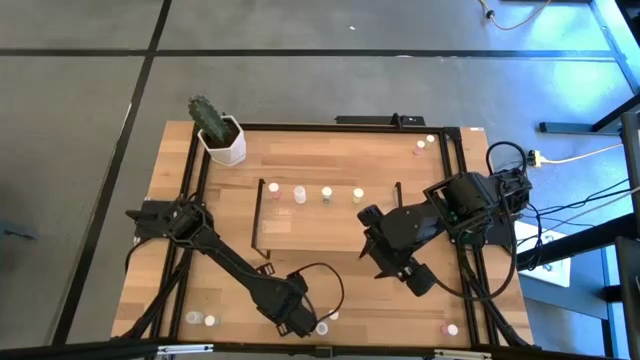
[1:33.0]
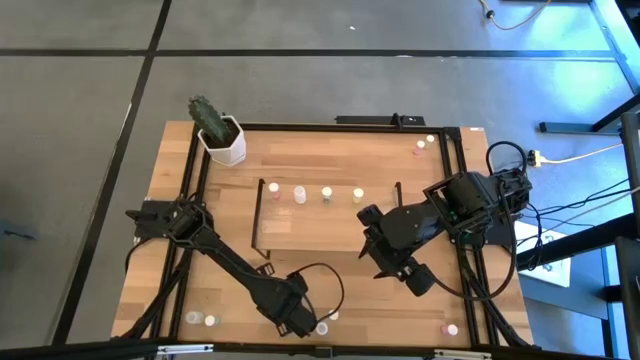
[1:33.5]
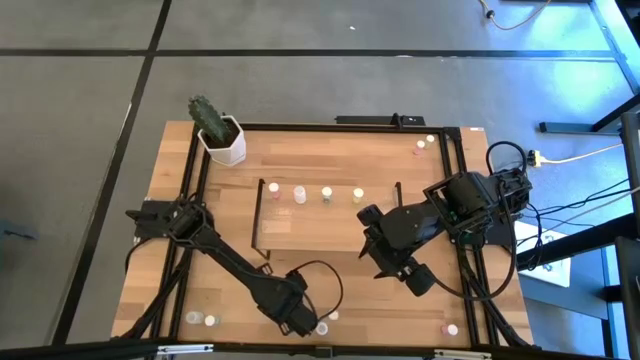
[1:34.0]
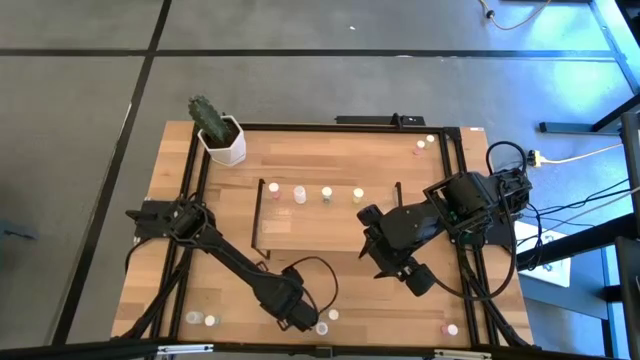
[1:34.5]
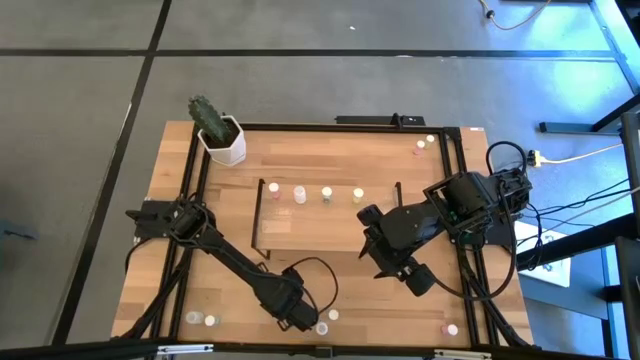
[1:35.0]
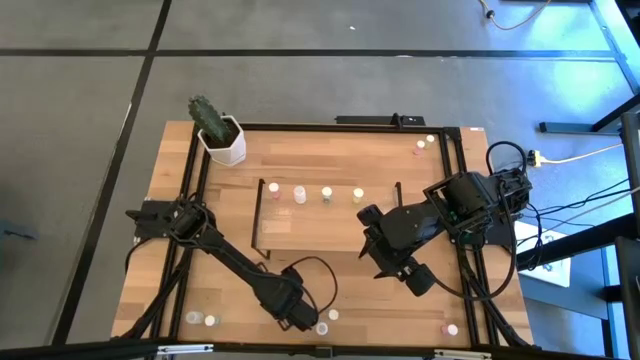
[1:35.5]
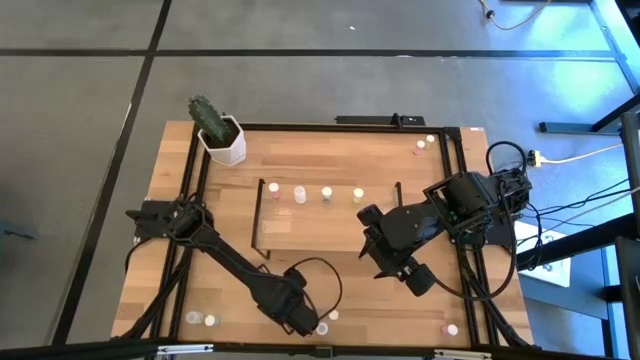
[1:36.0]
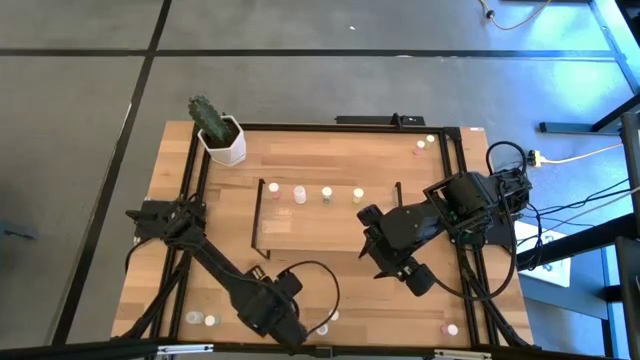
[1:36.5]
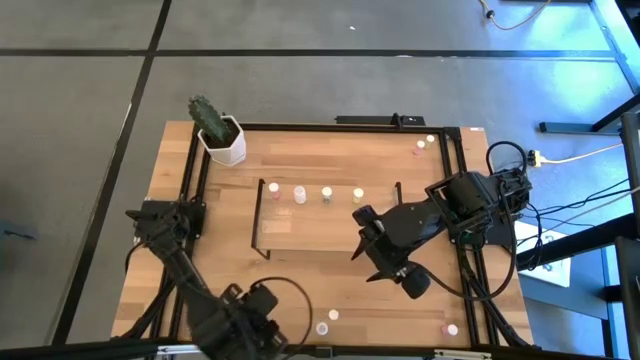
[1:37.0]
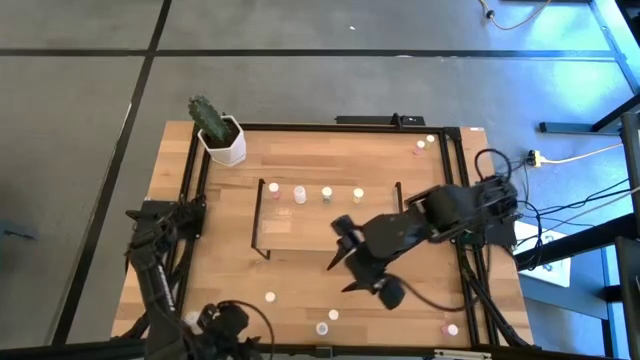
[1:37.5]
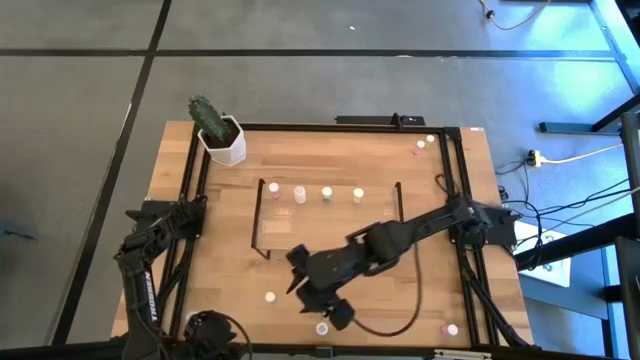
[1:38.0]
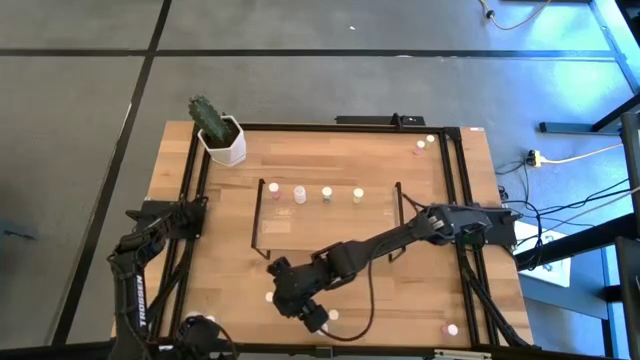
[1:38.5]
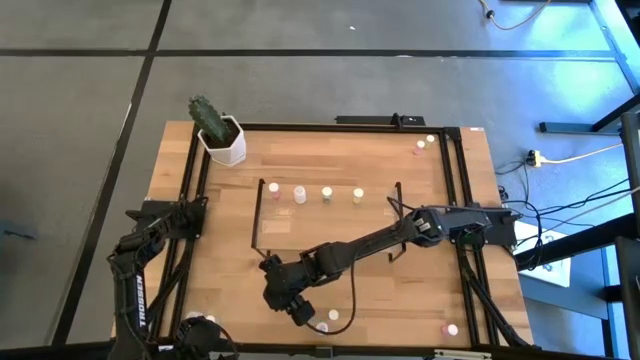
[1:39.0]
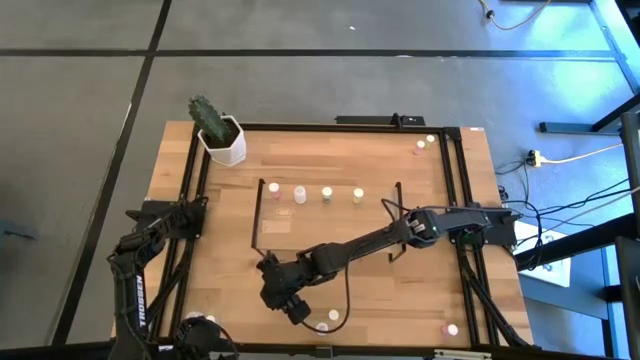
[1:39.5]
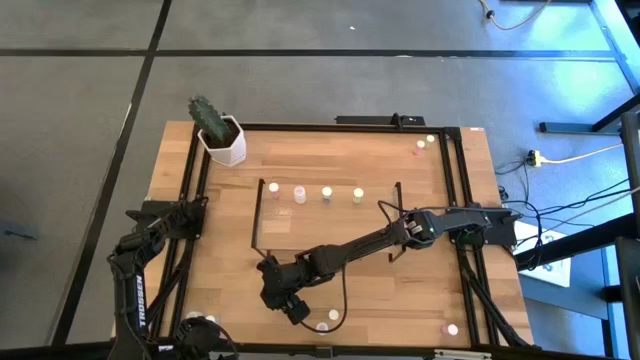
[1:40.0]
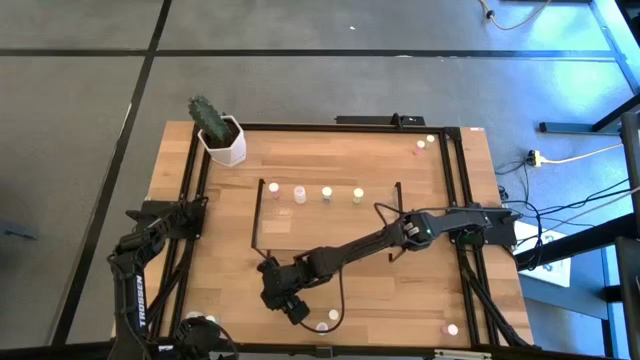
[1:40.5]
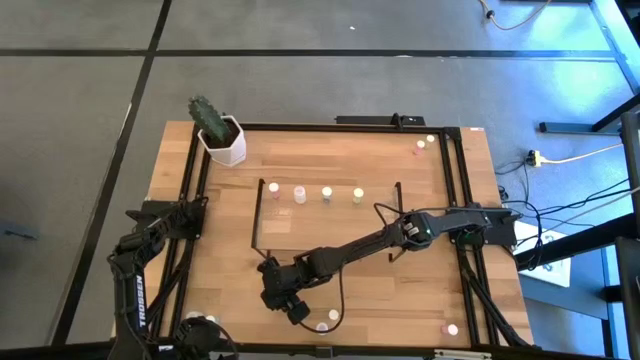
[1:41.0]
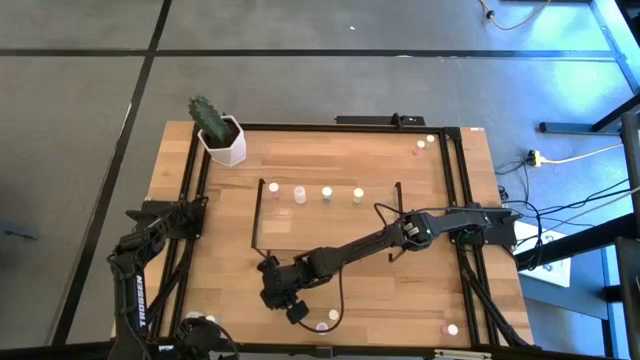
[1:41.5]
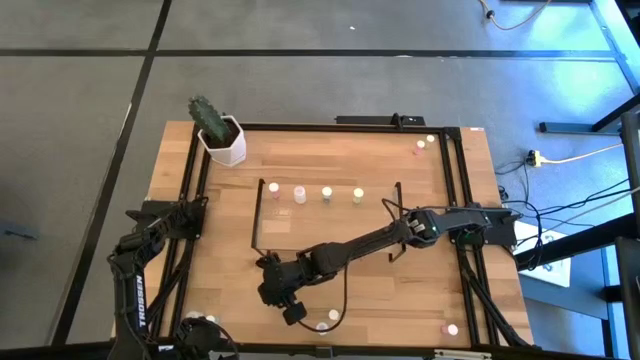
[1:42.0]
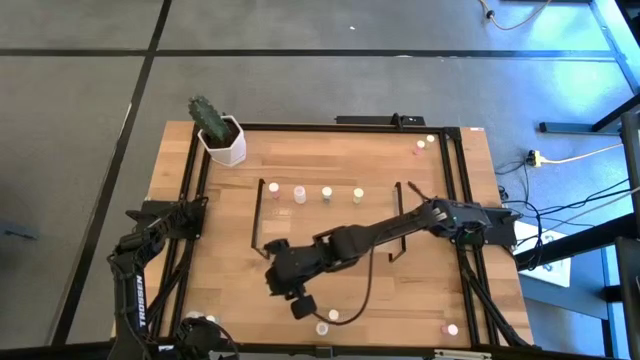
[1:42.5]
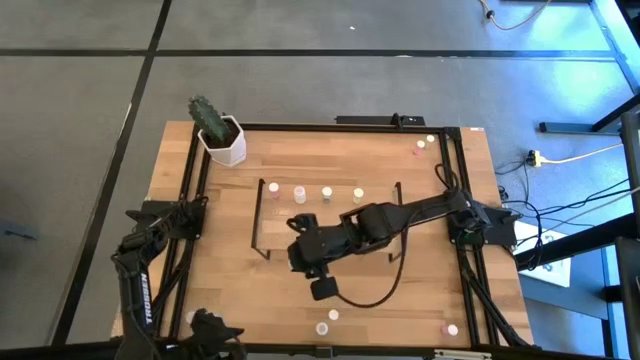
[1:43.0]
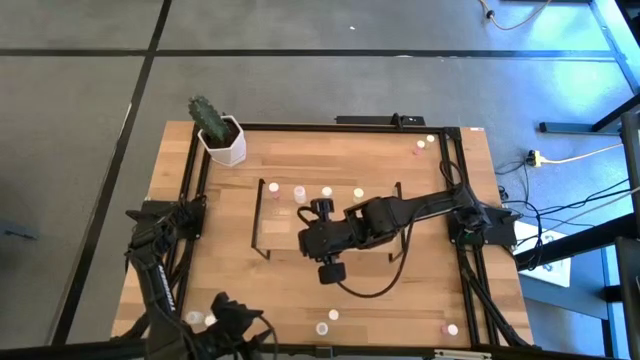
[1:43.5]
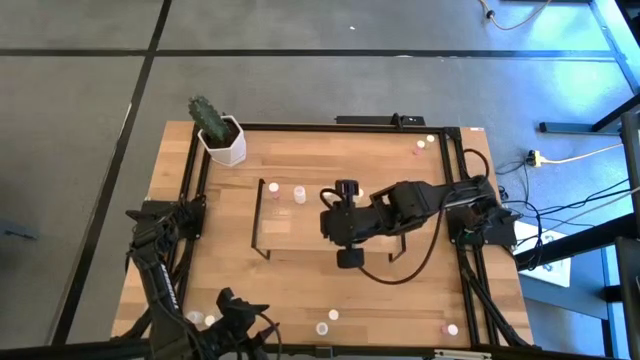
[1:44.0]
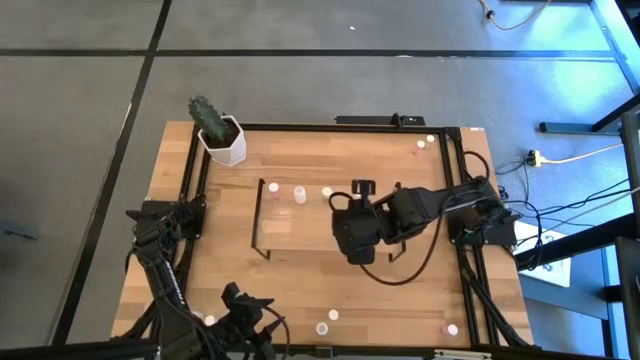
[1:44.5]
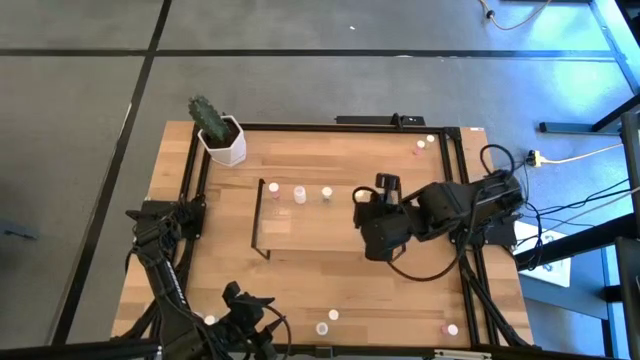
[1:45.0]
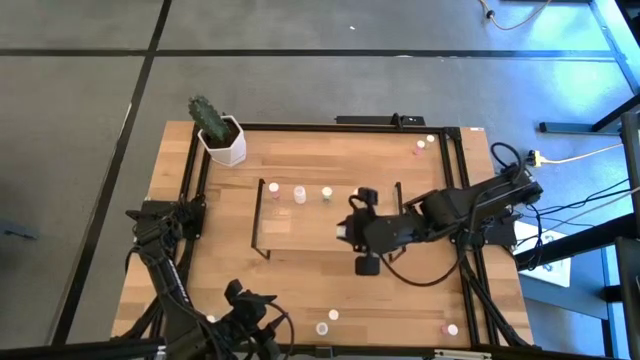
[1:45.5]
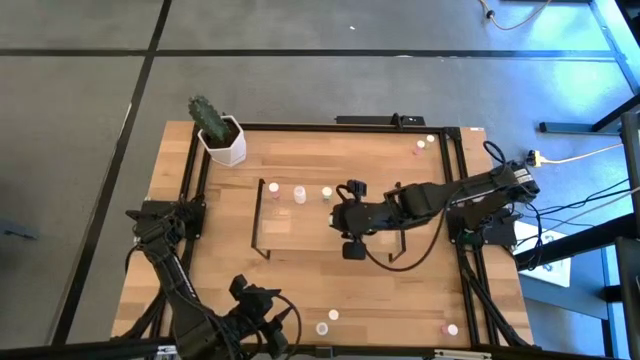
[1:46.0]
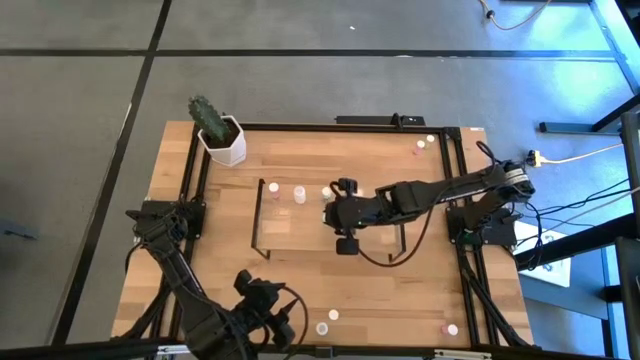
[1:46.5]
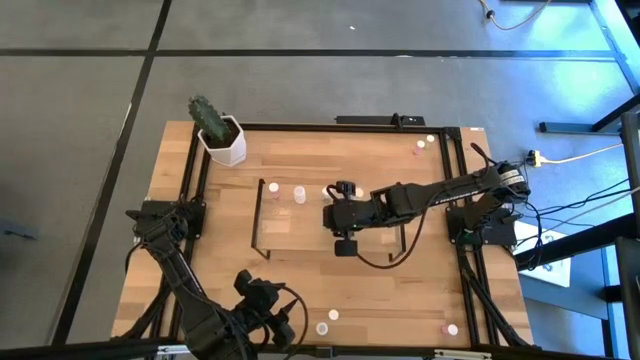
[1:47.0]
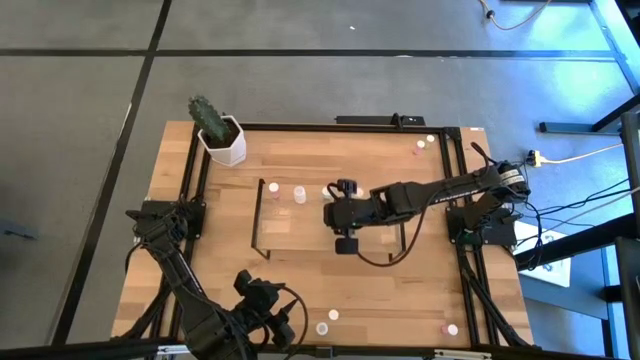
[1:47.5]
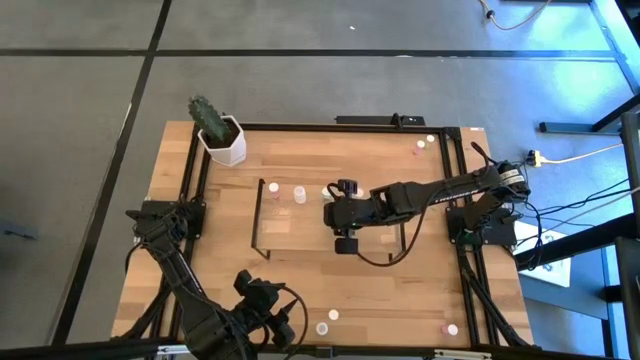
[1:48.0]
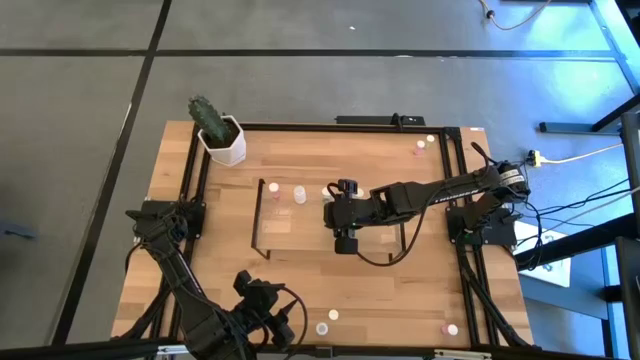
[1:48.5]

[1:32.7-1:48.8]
Task: Pick and place medicine bottles onto shelf by color
Put the top blue pill bottle on the shelf aligned with the other blue pill bottle

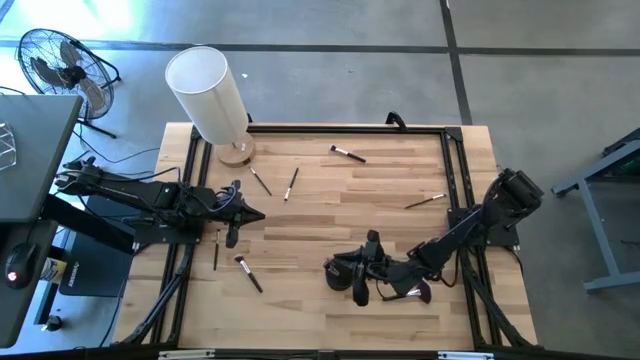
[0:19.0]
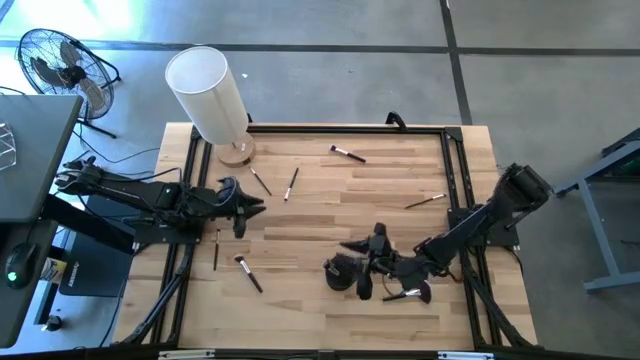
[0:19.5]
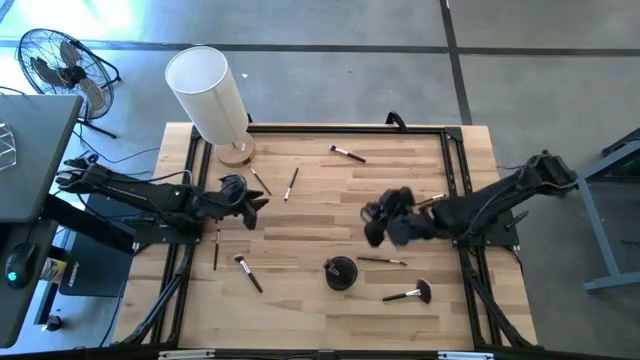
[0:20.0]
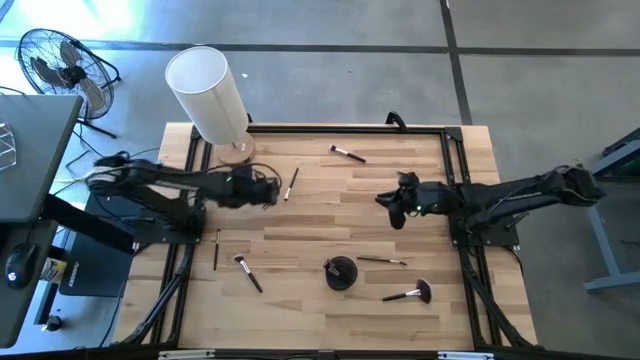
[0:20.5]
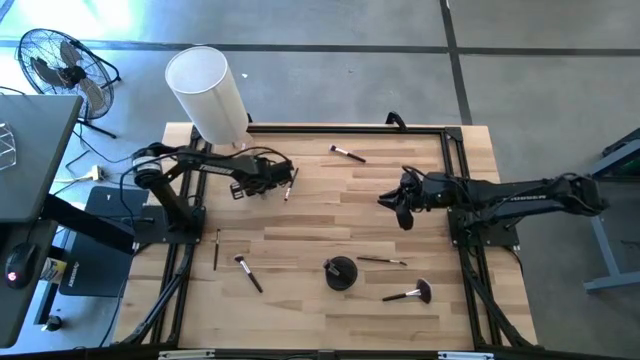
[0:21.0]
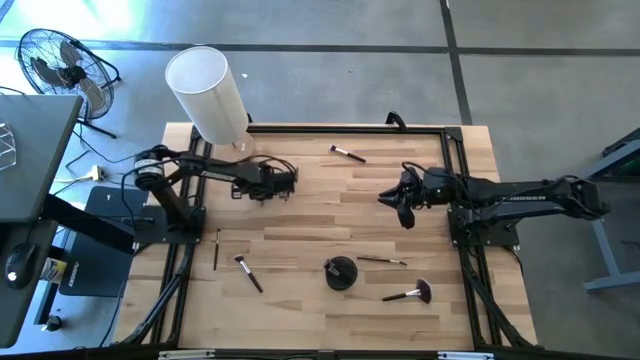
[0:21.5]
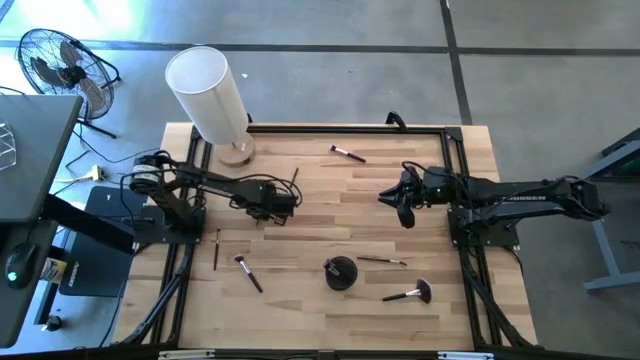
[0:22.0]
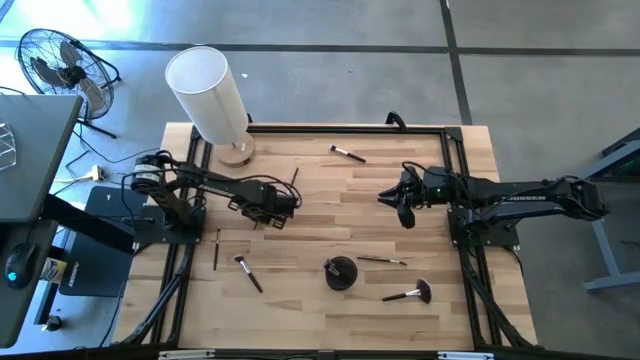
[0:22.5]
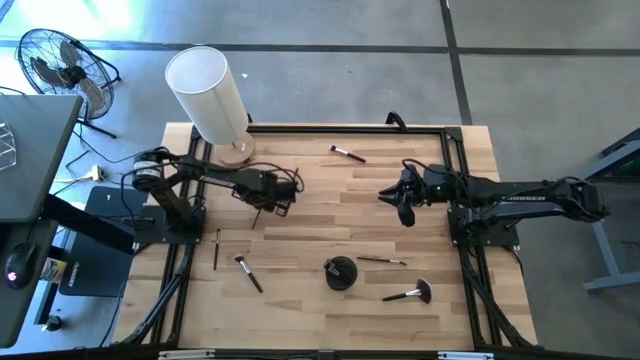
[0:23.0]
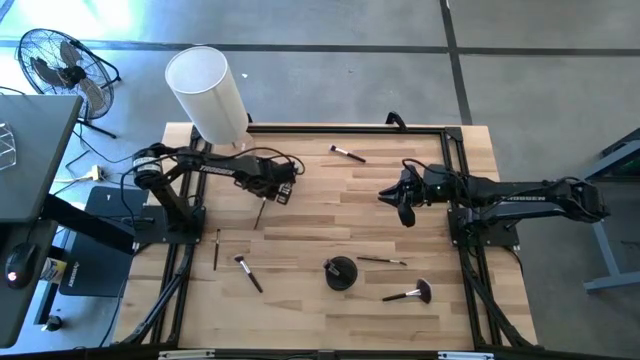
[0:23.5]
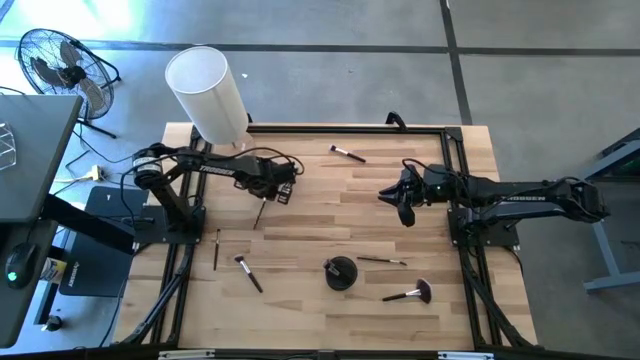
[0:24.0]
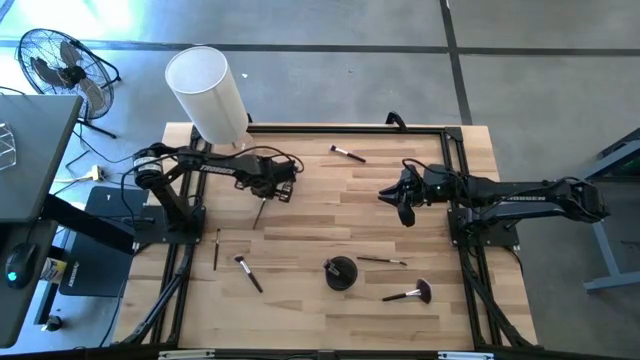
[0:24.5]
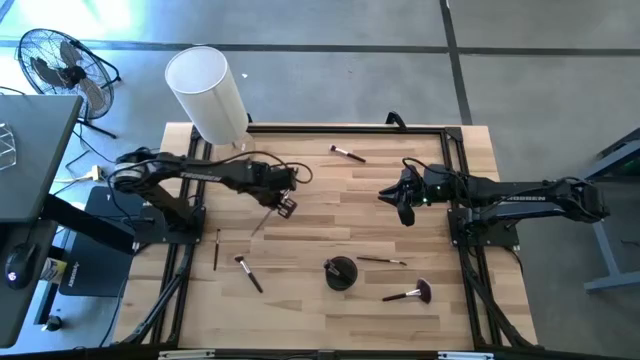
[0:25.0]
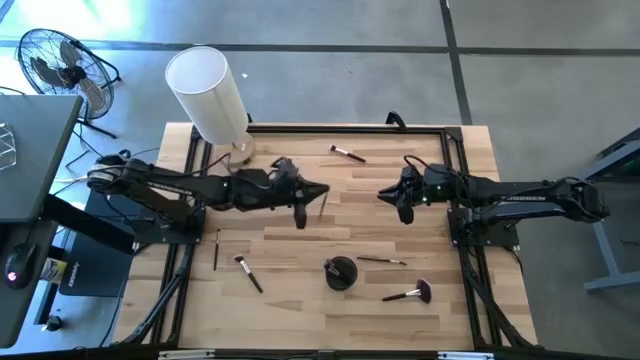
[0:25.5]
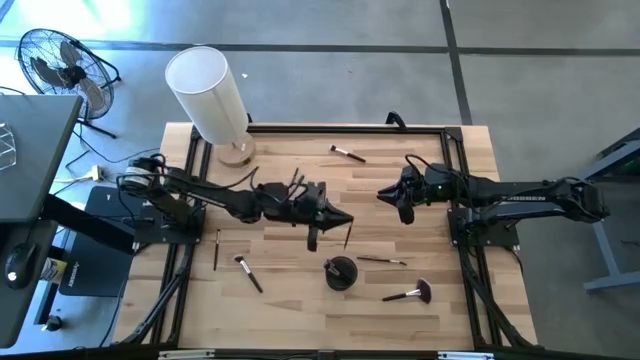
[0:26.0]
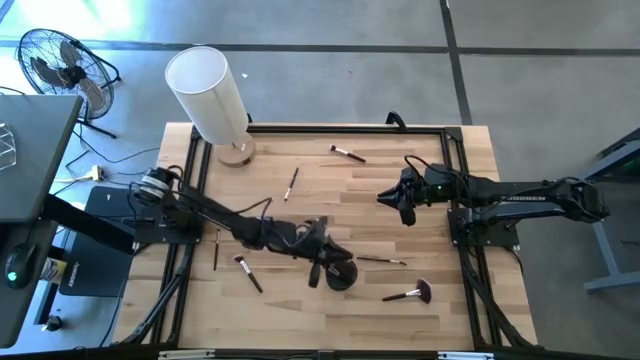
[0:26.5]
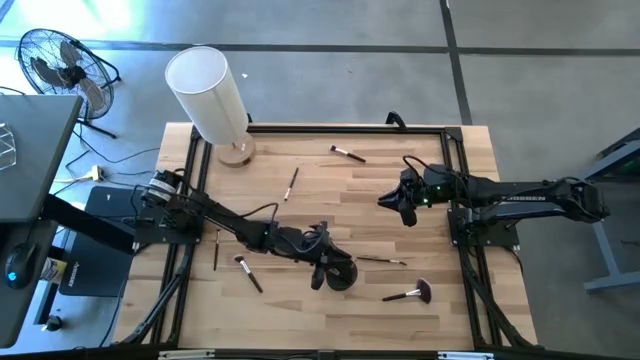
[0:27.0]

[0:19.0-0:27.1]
Task: Pick & Place Makeup Supplies
Put the makeup brush into the black makeup holder
